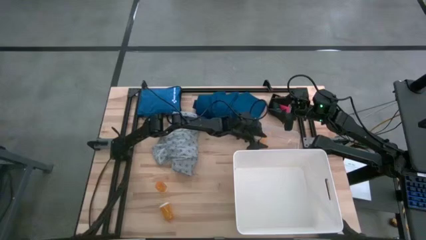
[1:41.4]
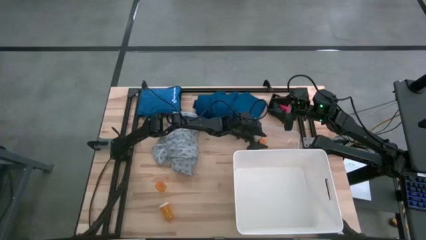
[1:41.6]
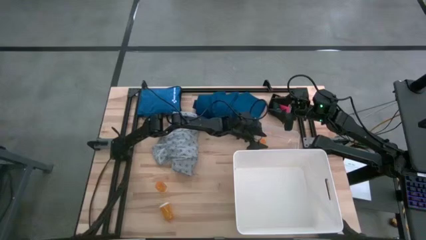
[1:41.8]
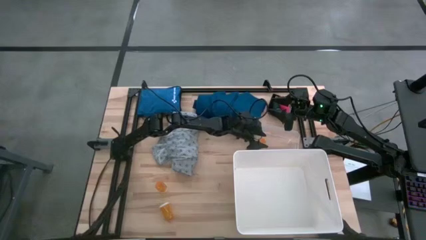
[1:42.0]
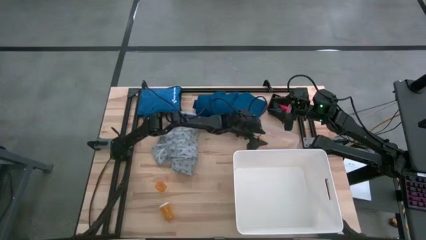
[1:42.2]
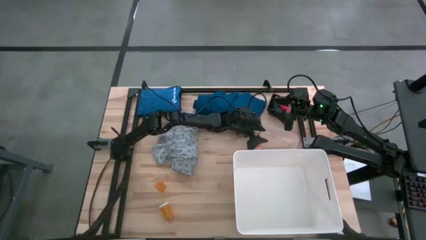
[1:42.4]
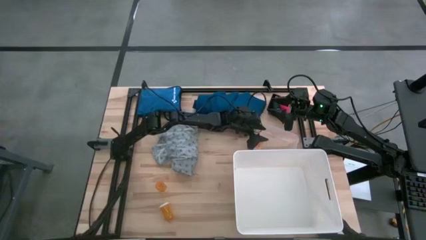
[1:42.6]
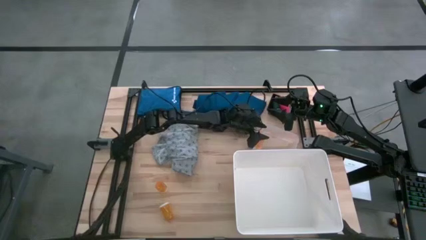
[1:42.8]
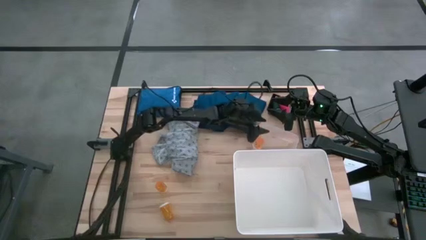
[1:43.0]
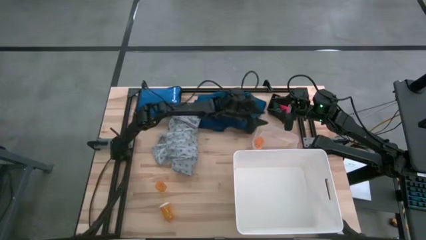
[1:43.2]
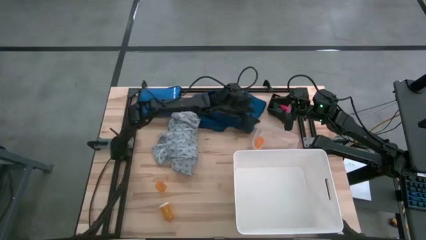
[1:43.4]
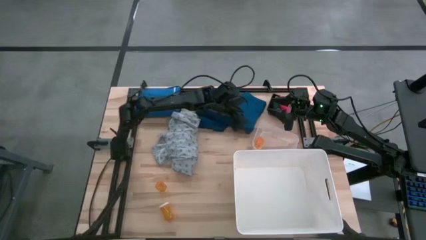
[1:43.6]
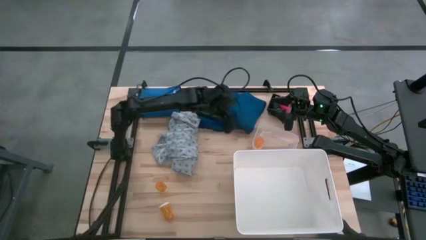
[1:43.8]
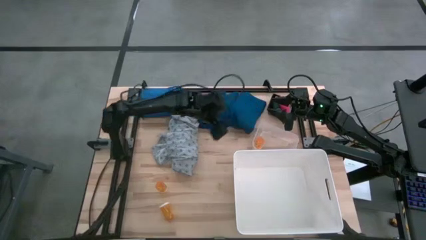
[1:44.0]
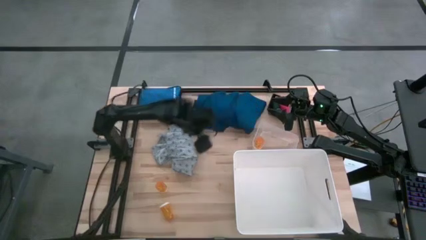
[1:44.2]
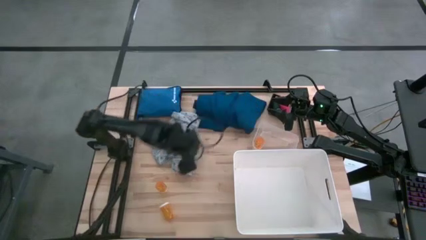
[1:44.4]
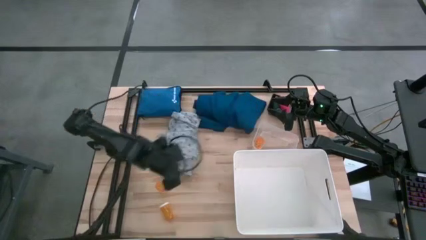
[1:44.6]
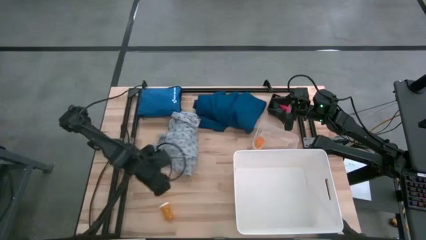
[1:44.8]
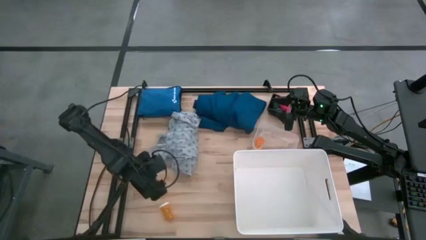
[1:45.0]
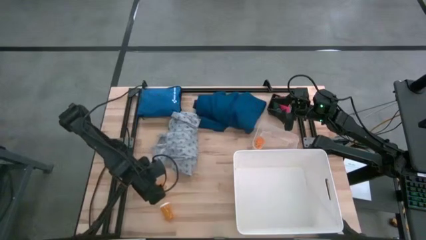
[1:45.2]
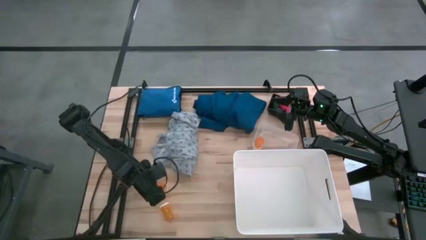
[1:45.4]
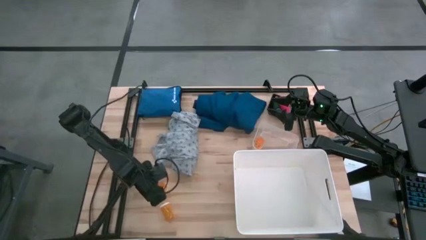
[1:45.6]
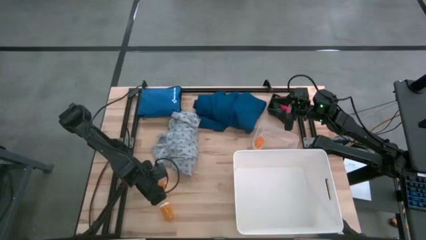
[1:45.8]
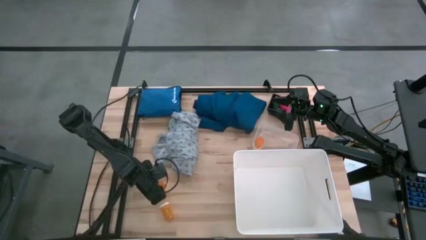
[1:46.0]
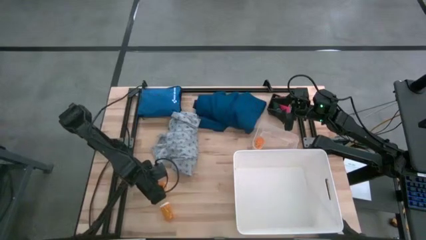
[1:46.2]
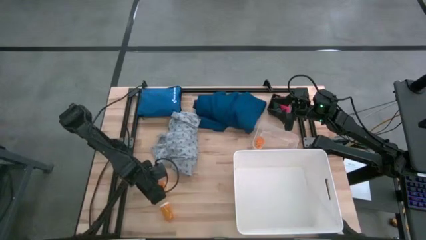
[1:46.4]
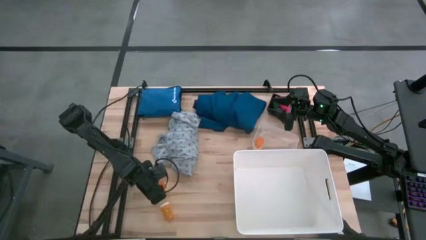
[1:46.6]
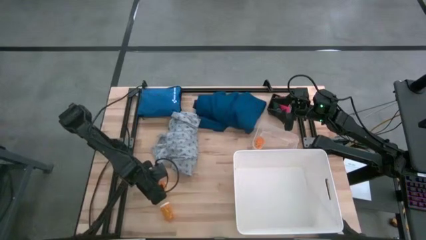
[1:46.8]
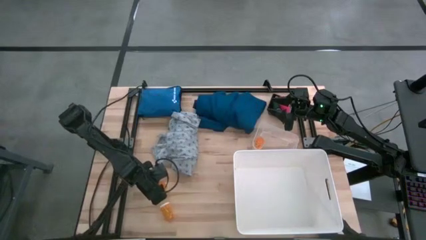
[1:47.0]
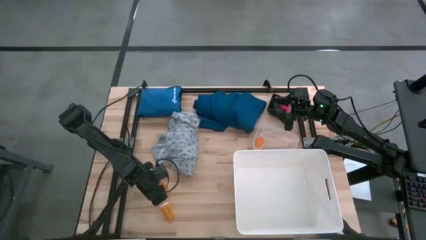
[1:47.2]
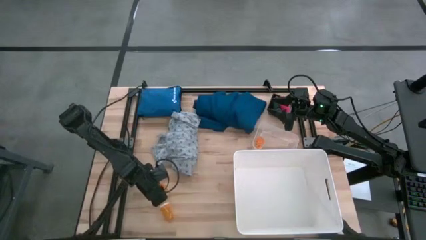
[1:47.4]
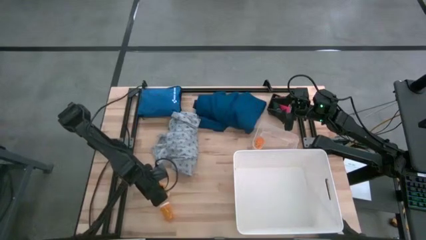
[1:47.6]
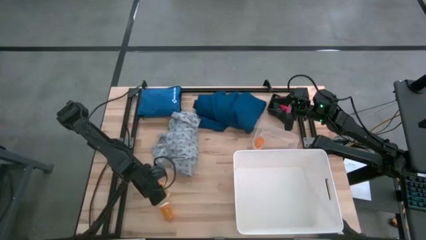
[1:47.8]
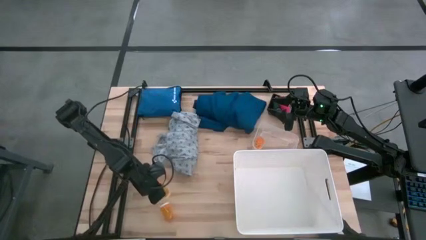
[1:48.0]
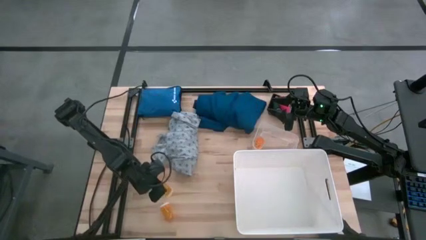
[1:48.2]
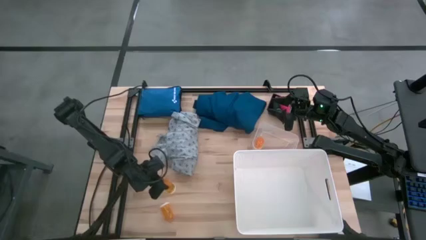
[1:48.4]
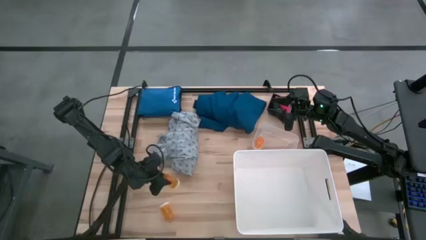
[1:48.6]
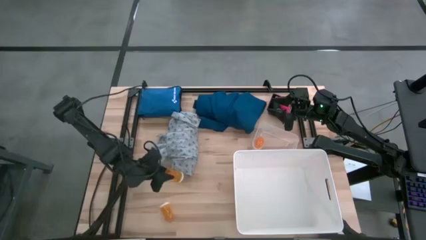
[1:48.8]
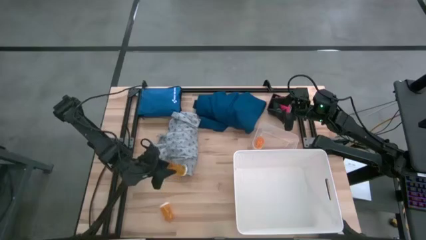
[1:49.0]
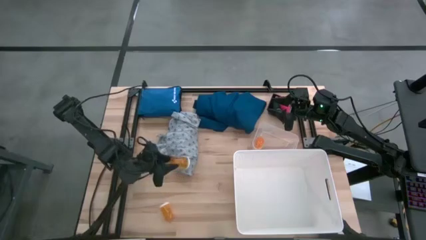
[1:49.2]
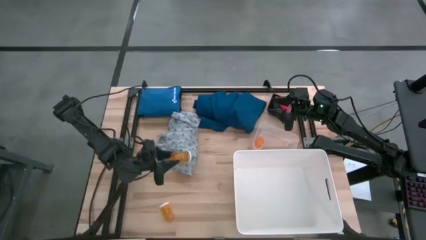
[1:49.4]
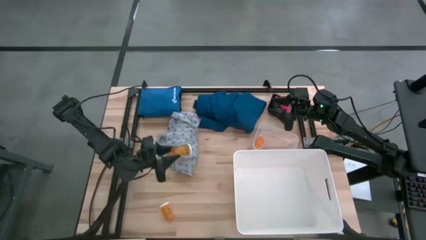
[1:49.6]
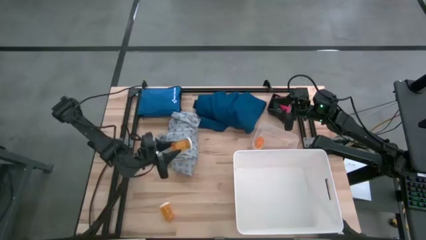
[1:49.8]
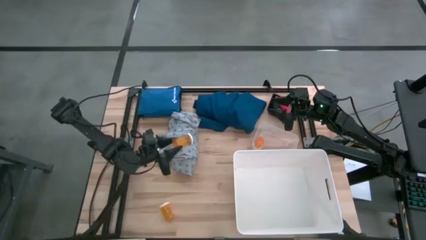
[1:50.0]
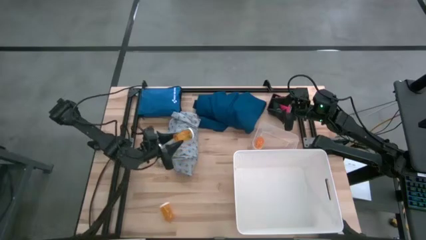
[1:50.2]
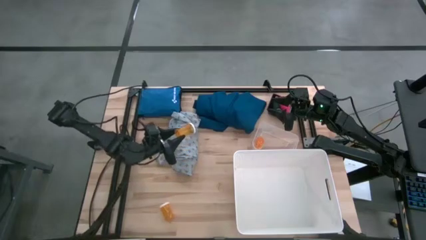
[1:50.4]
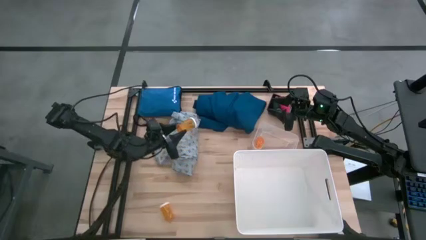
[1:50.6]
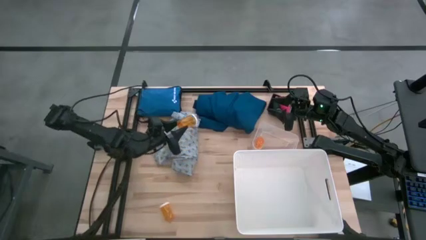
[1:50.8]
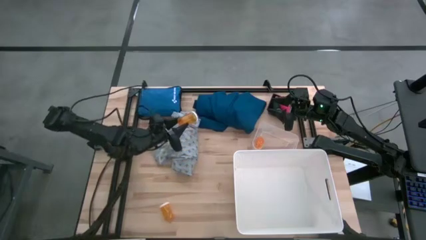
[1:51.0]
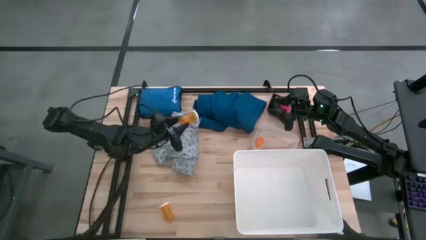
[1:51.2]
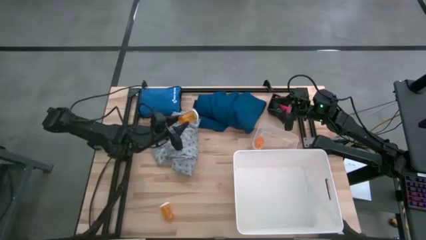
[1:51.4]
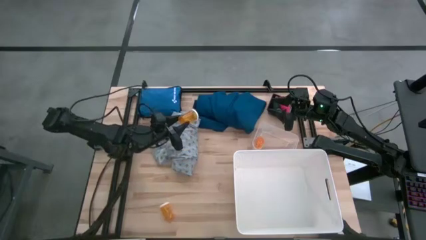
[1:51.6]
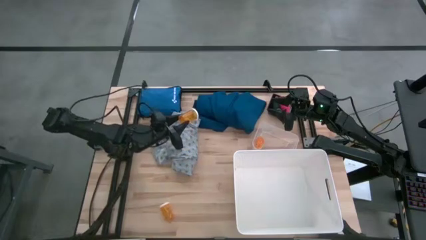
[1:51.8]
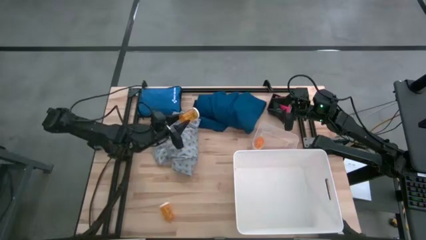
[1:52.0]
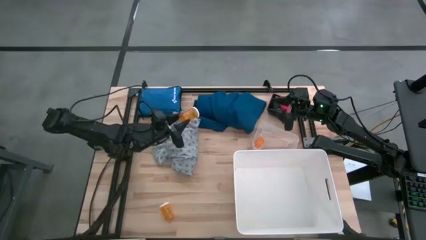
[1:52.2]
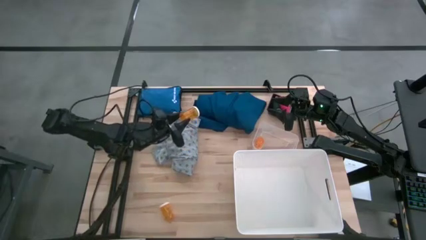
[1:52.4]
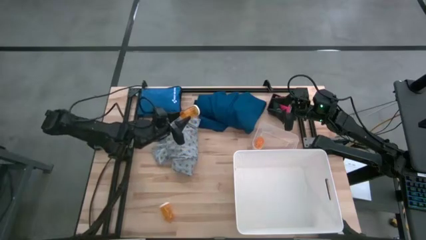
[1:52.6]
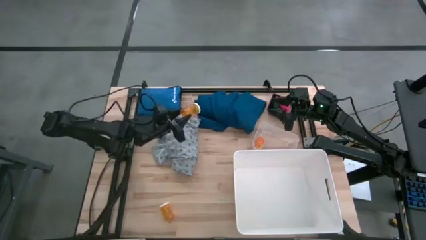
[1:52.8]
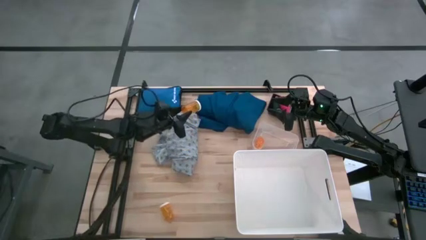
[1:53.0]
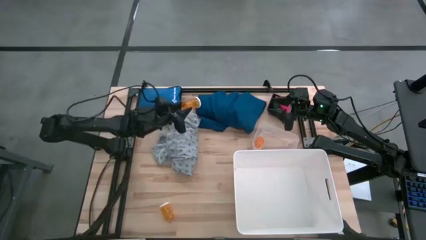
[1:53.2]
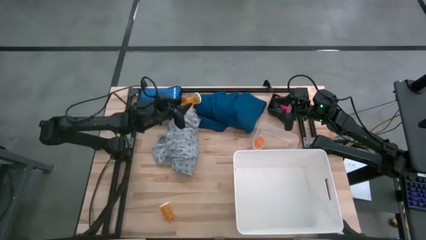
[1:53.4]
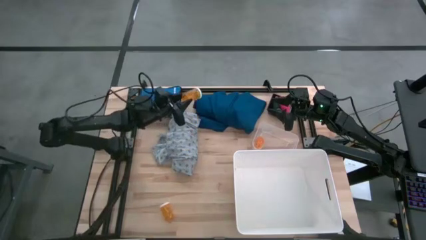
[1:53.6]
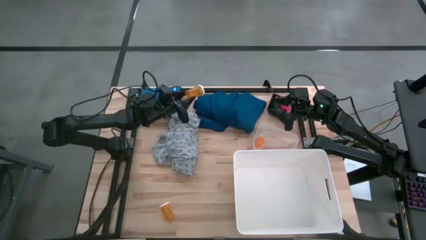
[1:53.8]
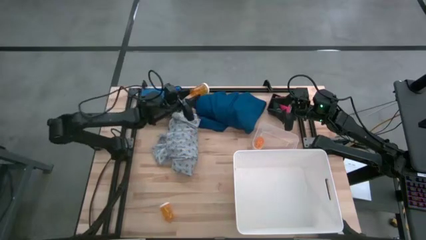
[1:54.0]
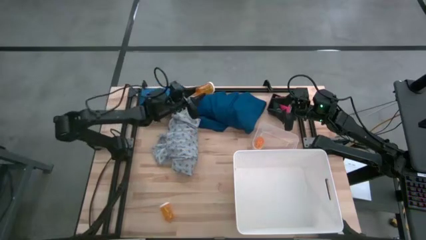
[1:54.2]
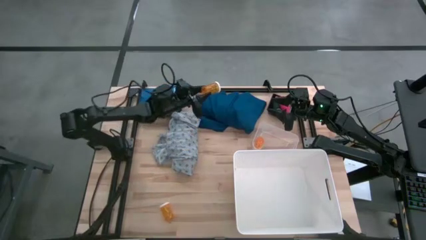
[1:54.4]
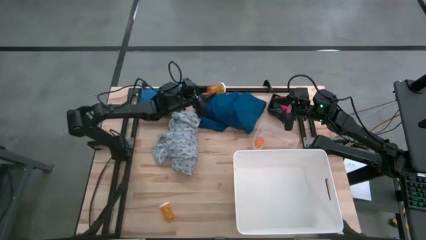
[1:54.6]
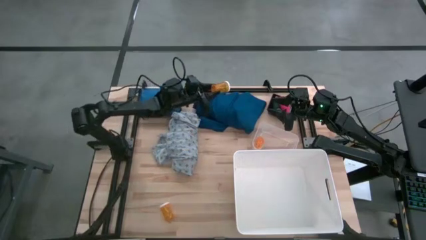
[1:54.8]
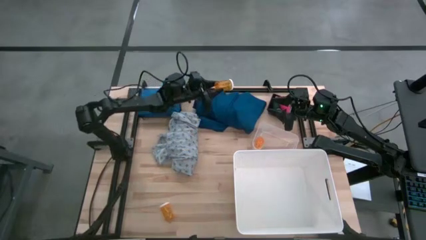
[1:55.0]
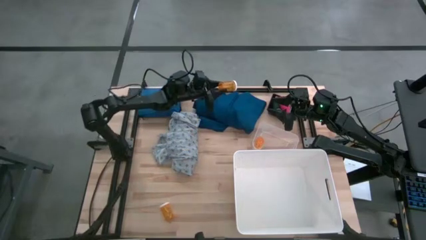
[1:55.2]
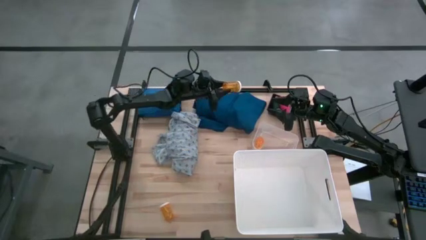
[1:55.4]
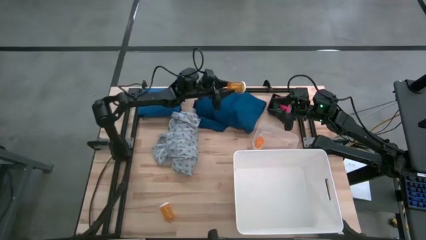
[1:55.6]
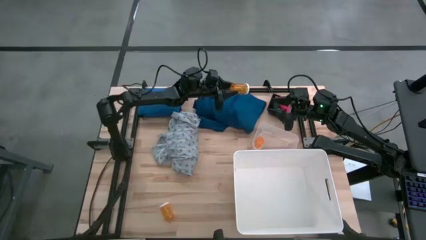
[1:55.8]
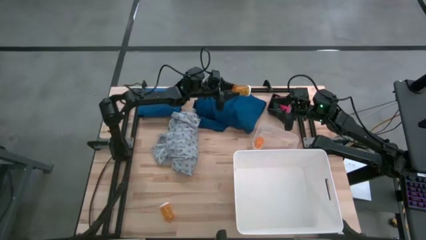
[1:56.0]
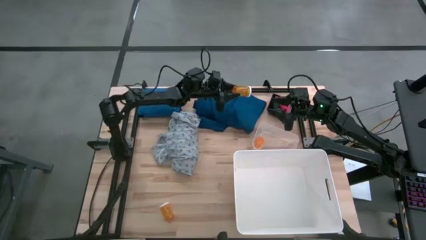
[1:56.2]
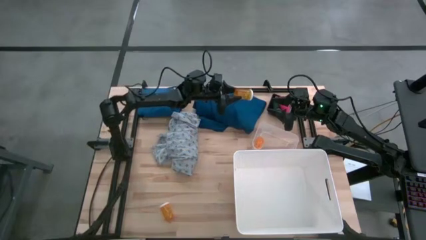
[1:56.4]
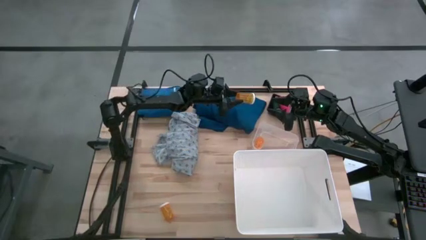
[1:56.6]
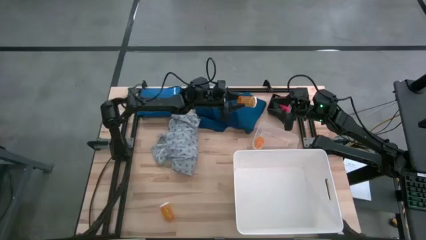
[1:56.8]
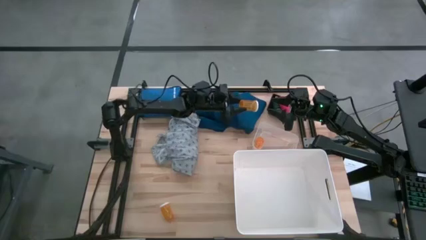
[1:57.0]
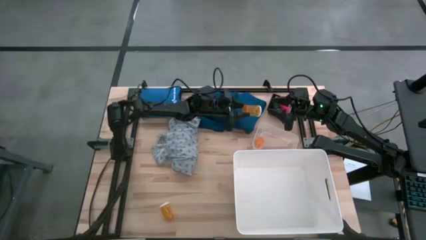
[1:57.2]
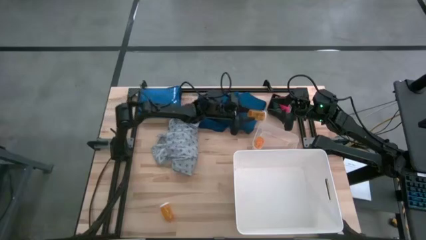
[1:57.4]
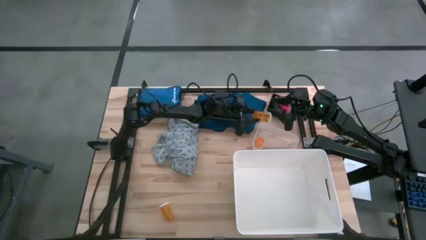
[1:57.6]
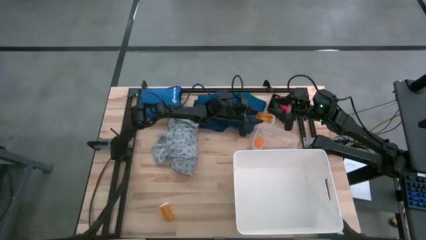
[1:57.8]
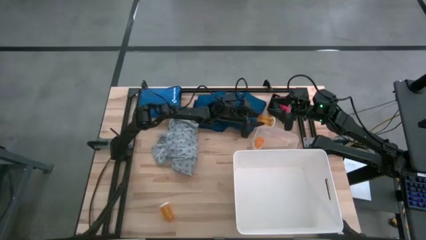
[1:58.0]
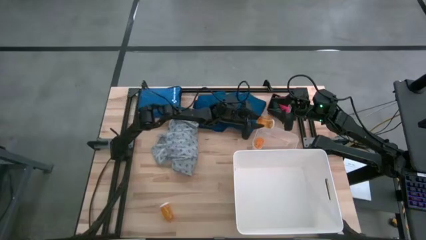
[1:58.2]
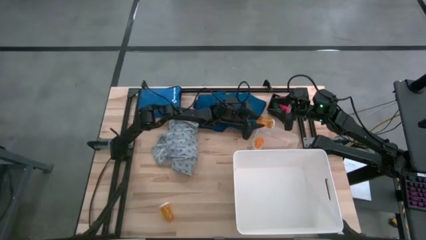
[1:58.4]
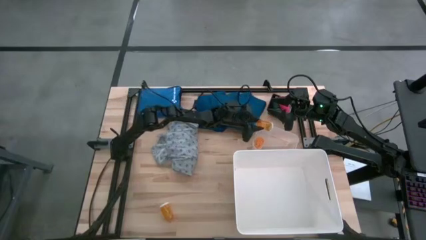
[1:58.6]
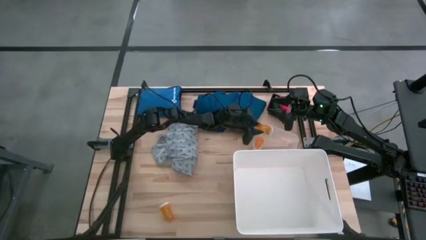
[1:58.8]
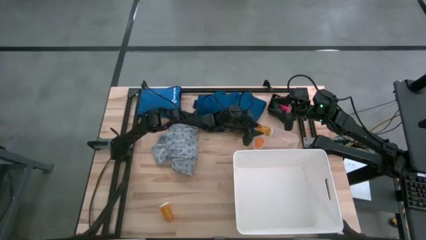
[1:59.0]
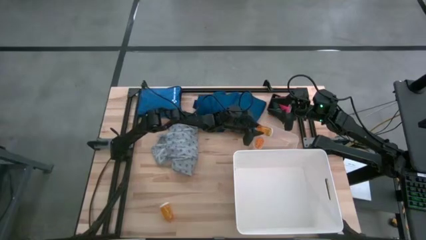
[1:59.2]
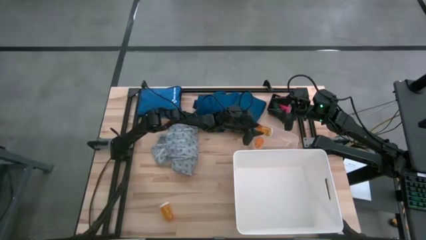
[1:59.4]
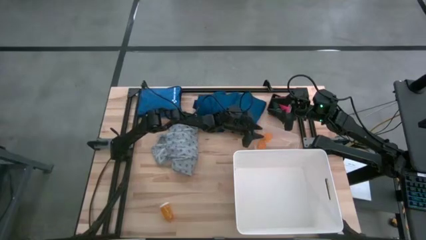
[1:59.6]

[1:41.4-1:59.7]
Task: Pick & place medical supplies in basket/bin
Put the top orange pill bottle into the transparent bin
